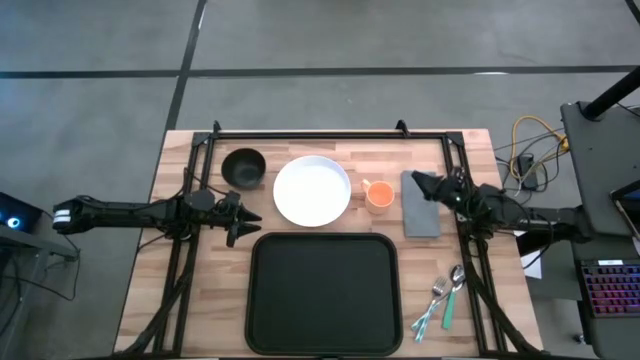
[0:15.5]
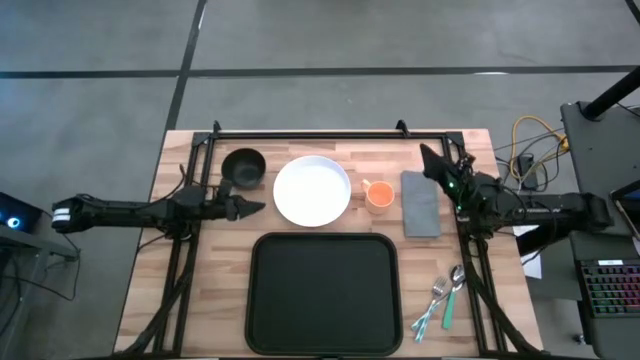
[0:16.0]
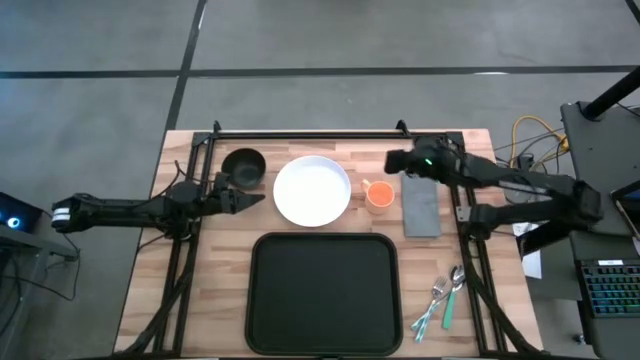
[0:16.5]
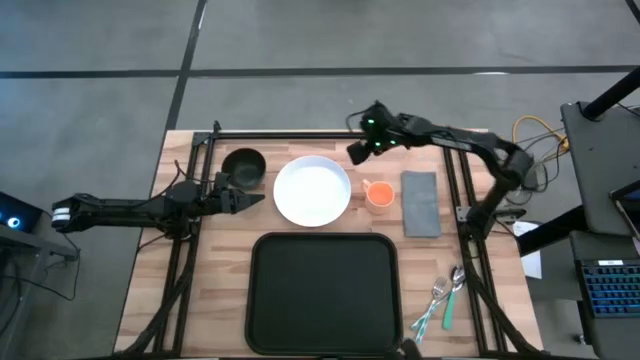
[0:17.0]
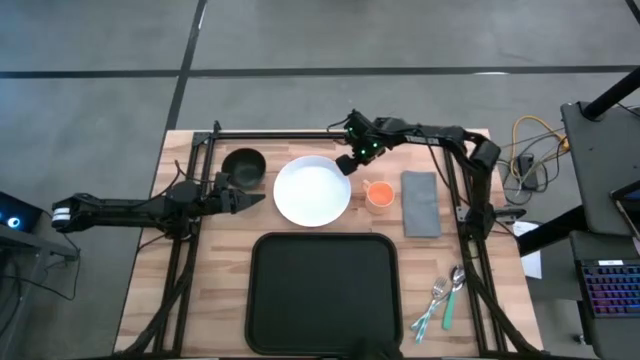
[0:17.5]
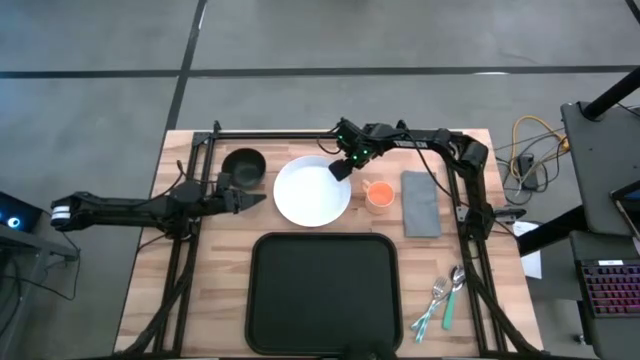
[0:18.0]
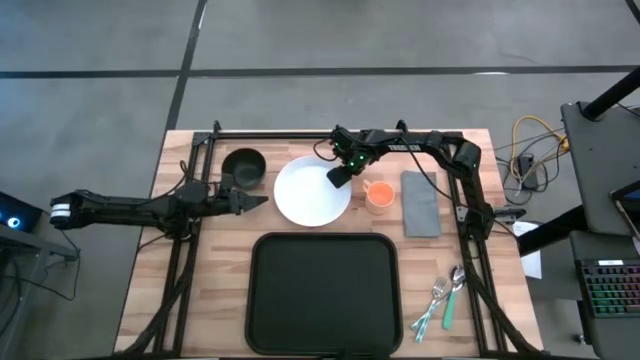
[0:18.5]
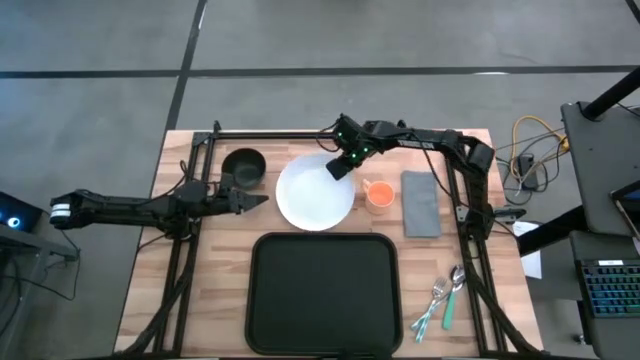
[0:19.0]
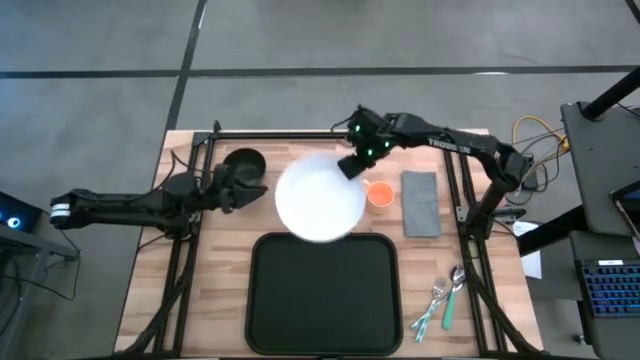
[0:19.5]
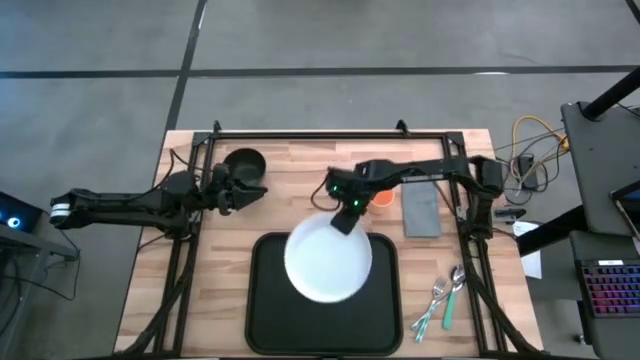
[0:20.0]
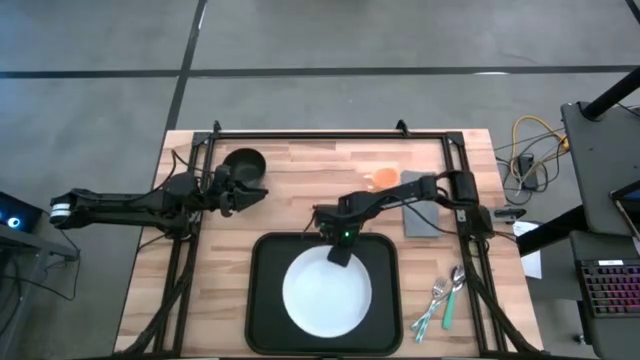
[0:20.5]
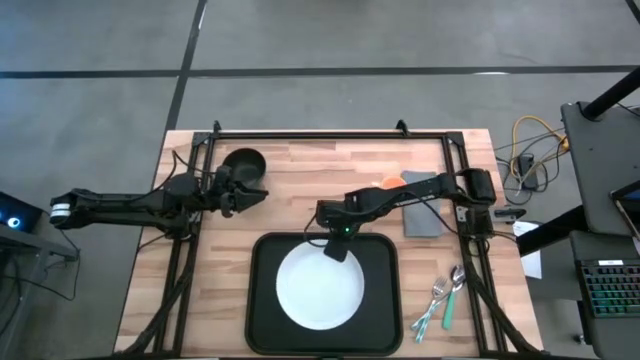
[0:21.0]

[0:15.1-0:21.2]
Task: Set up tray
Put the white plate in the center of the black tray

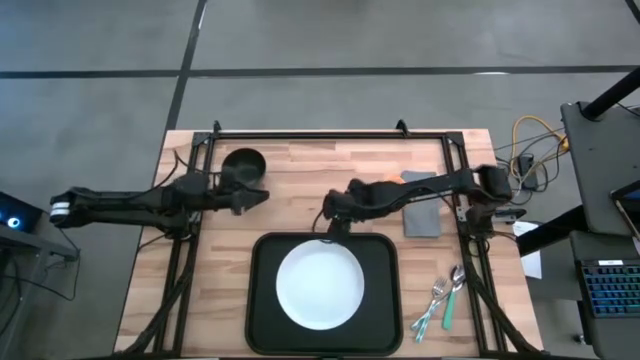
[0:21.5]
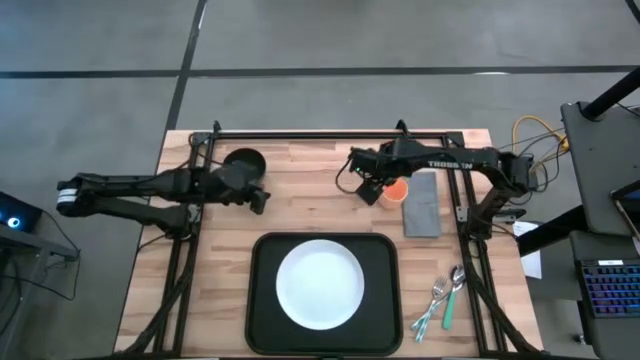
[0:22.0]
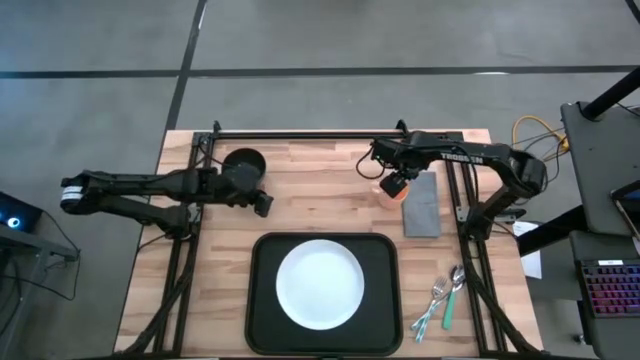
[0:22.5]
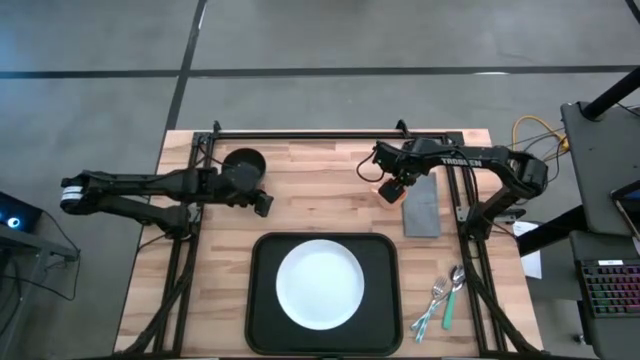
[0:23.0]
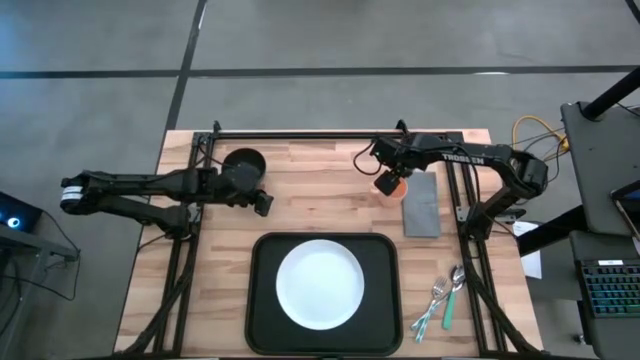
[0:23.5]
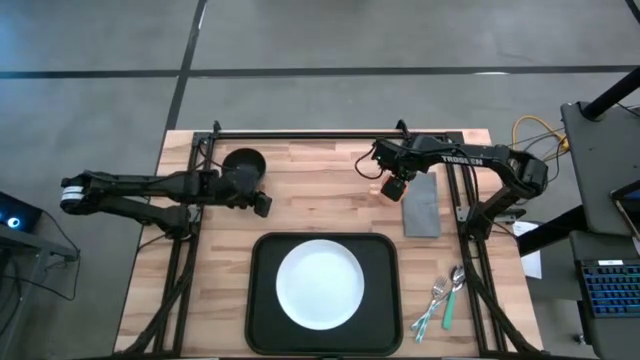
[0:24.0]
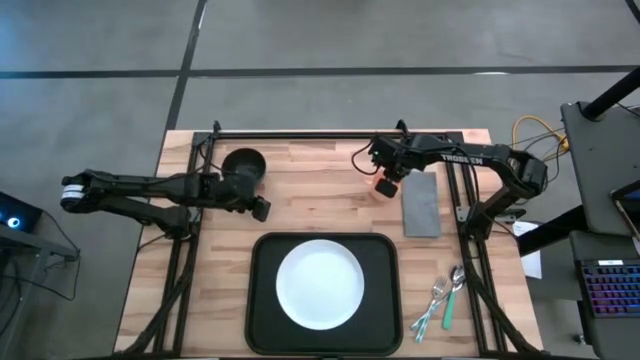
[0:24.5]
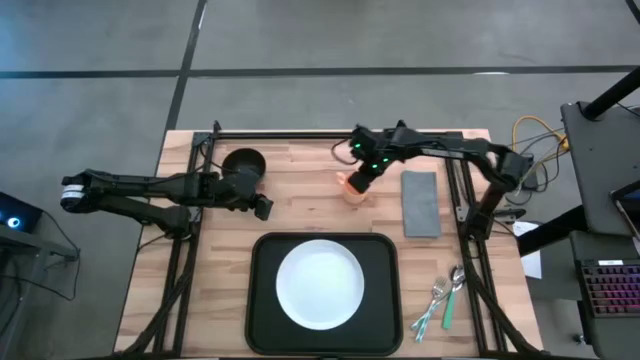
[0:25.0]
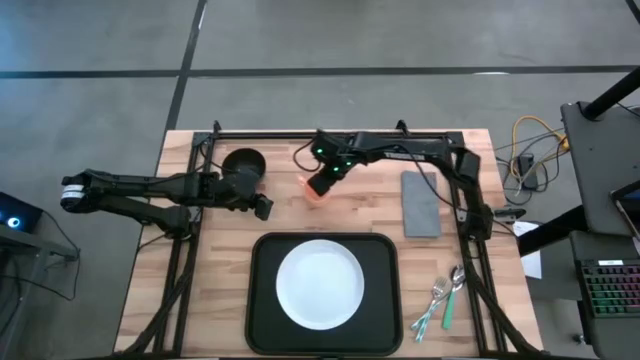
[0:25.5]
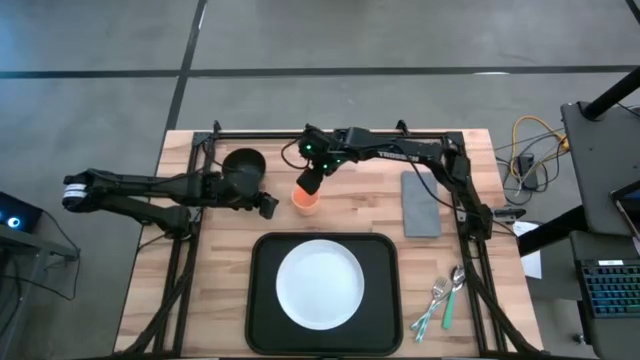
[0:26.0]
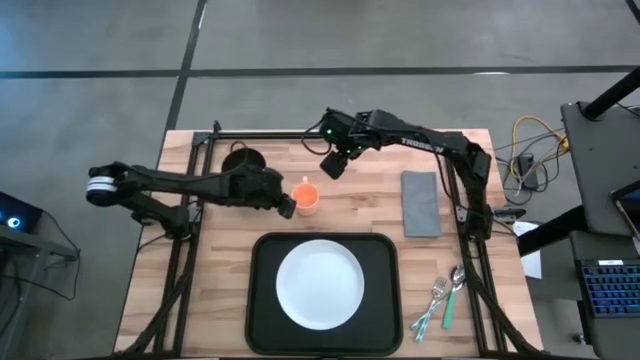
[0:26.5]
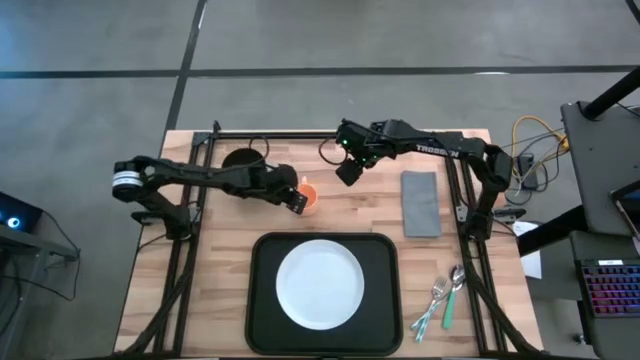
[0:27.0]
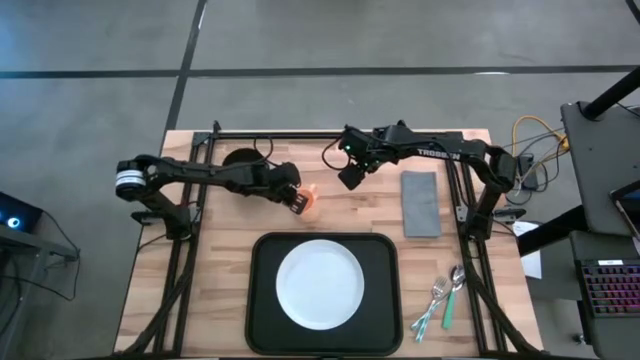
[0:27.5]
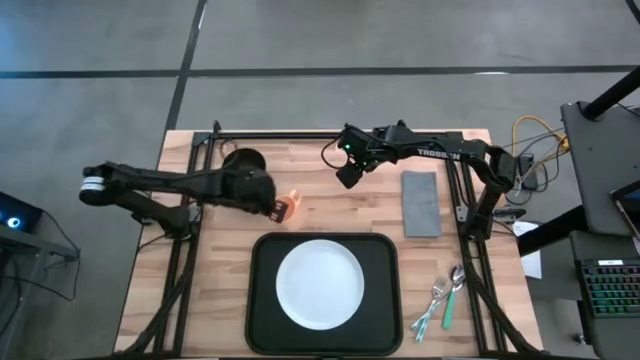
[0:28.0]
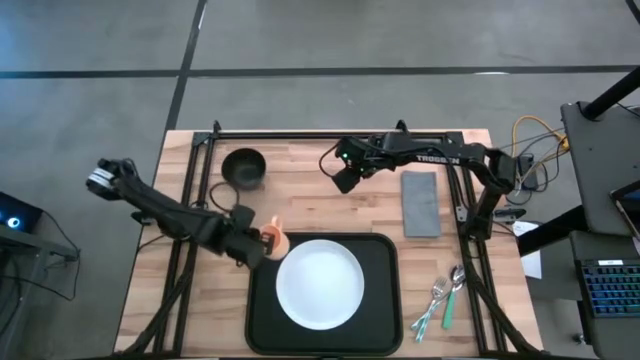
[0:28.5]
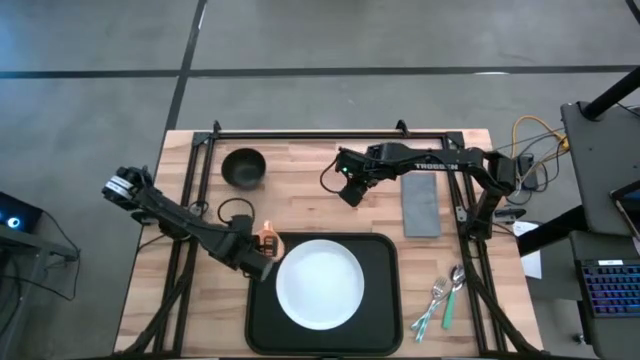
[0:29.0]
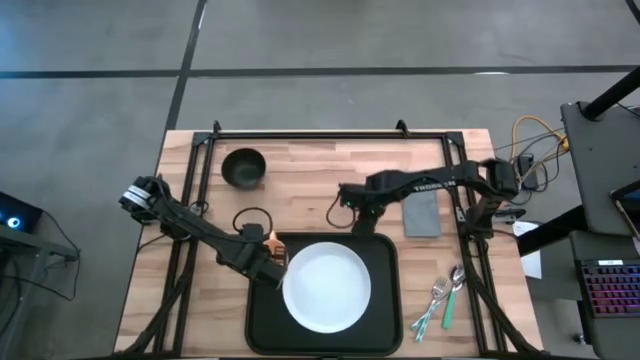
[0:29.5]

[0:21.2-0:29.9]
Put the orange cup on the black tray at the top left of the white plate

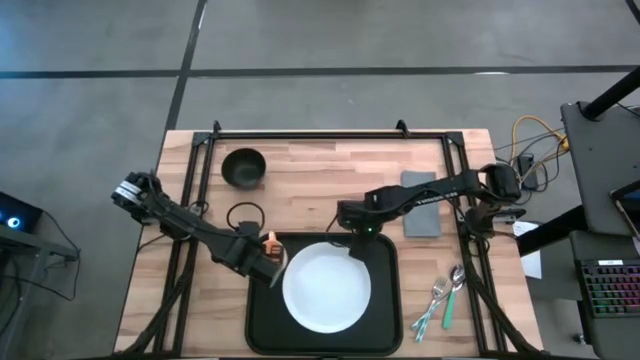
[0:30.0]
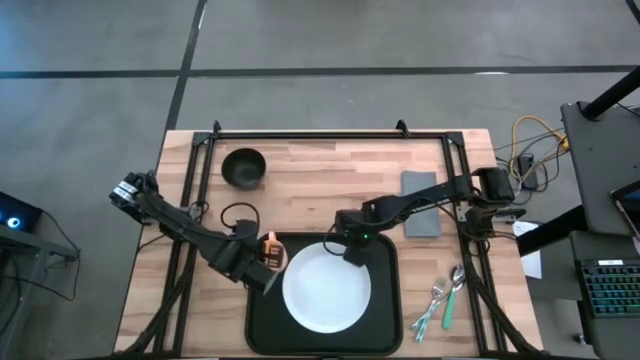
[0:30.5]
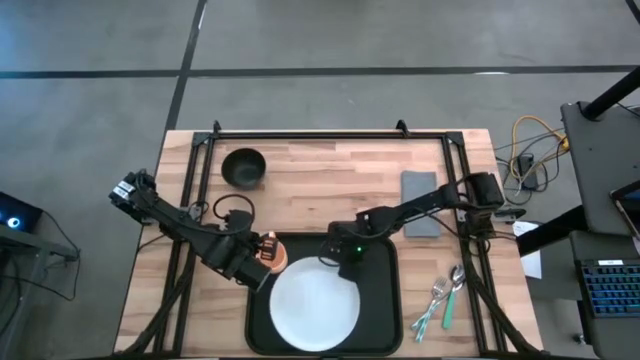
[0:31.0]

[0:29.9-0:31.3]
Adjust the white plate on the black tray

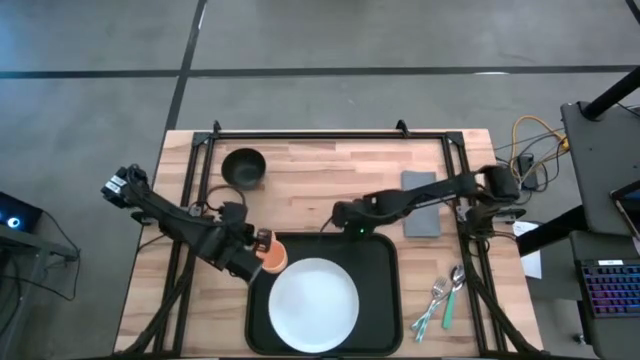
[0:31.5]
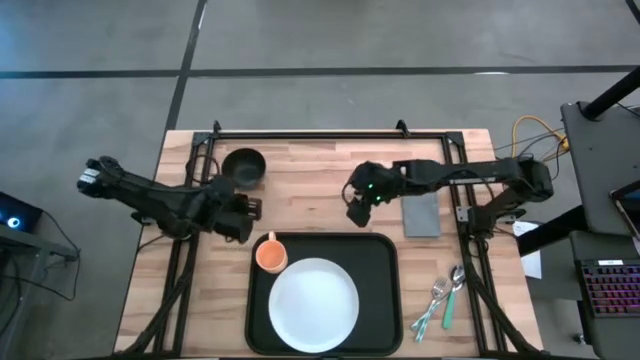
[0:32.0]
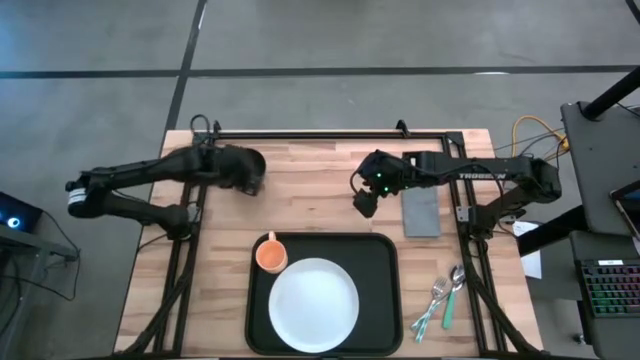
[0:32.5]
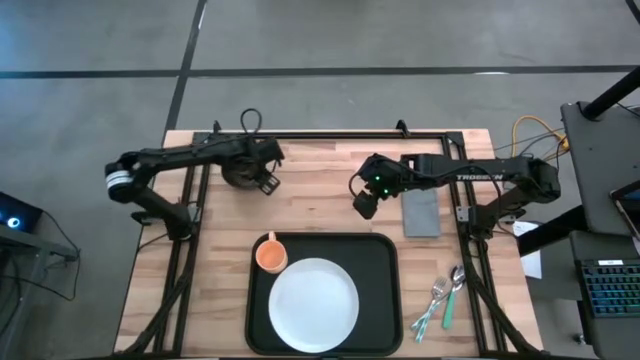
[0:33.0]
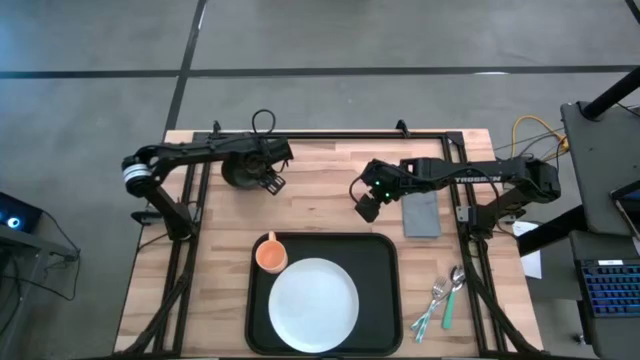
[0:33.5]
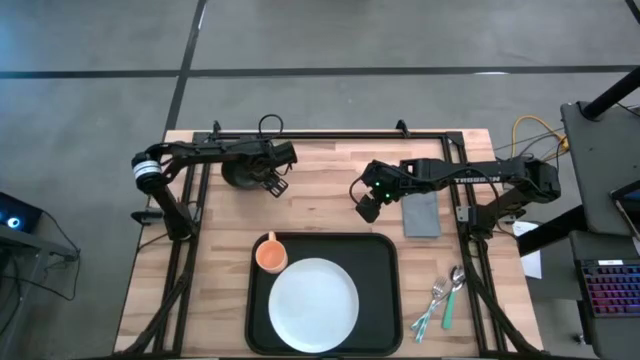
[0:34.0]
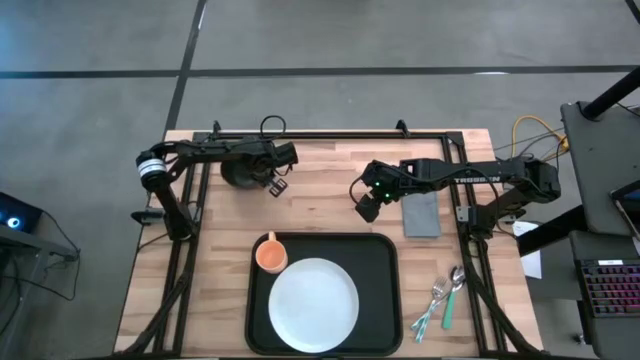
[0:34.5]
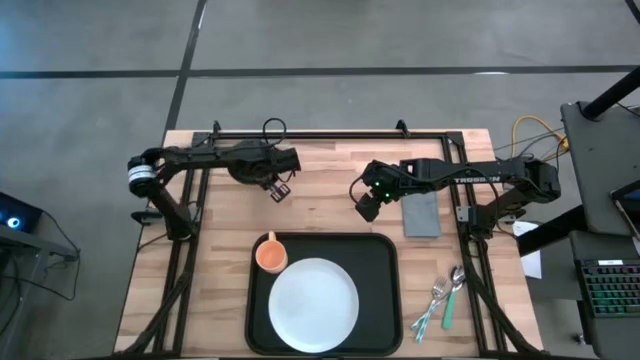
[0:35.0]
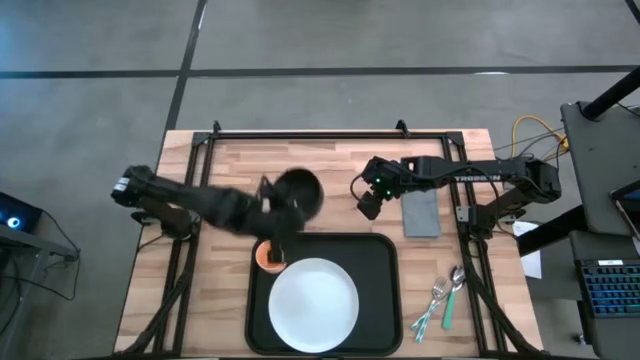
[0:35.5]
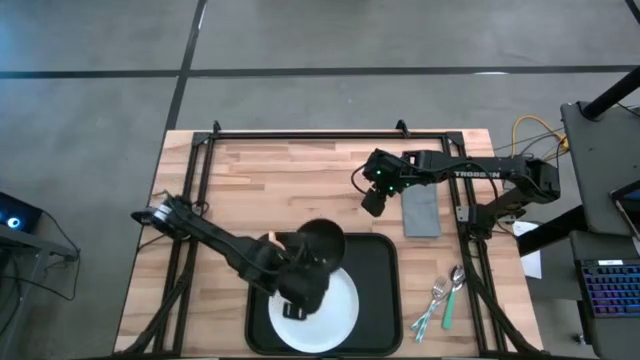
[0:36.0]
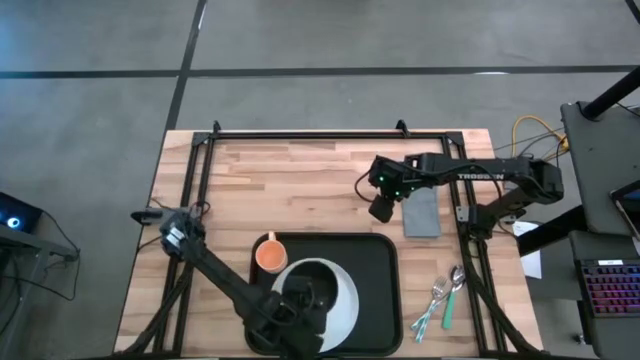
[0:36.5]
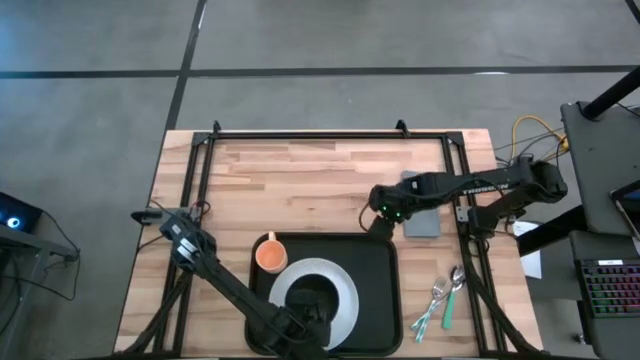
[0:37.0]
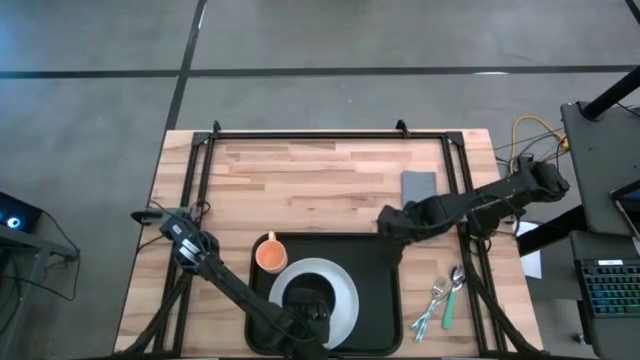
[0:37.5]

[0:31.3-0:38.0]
Put the black bowl on the white plate
